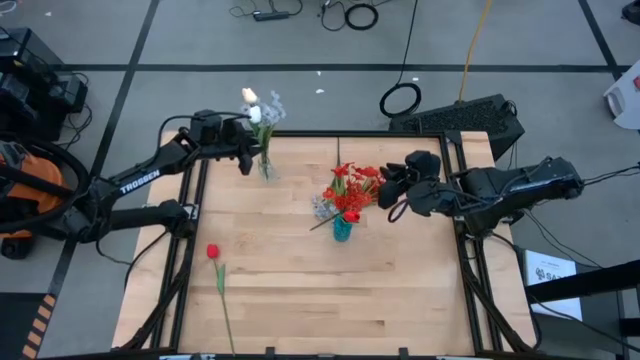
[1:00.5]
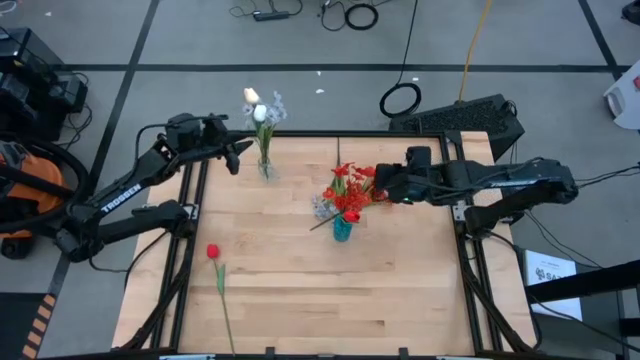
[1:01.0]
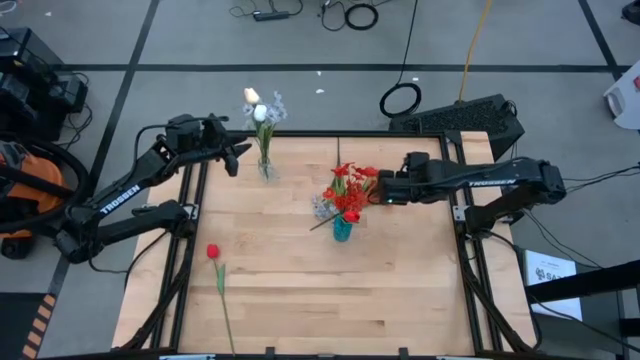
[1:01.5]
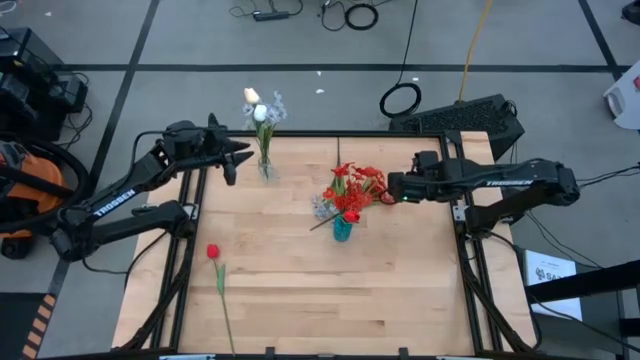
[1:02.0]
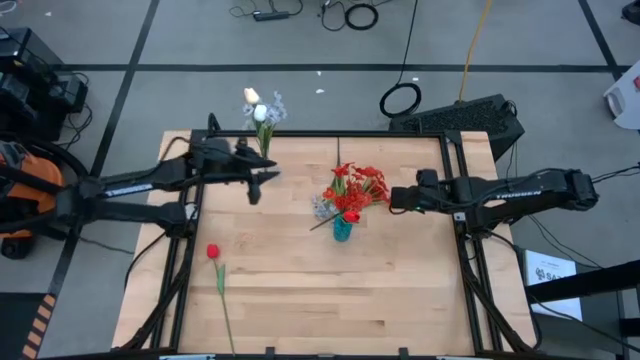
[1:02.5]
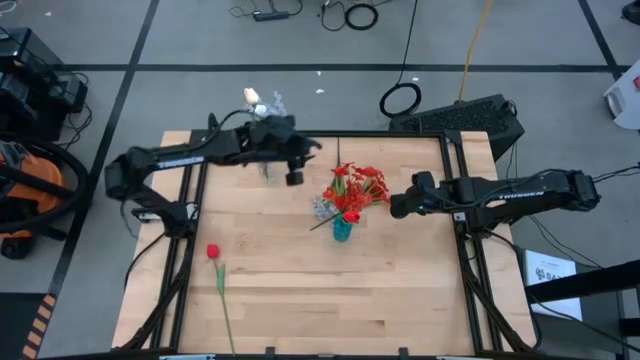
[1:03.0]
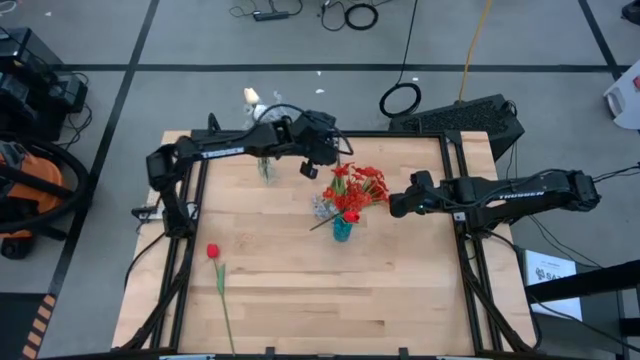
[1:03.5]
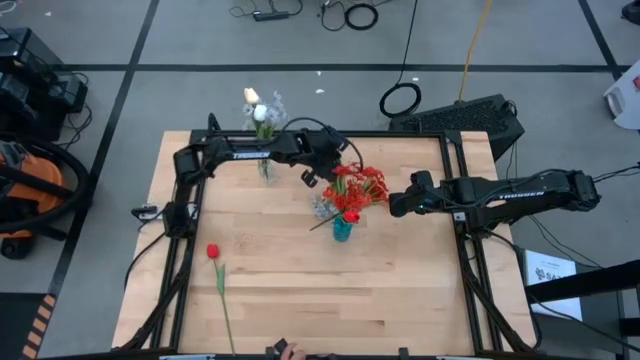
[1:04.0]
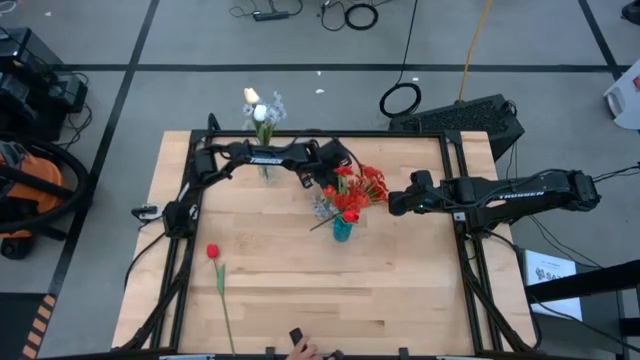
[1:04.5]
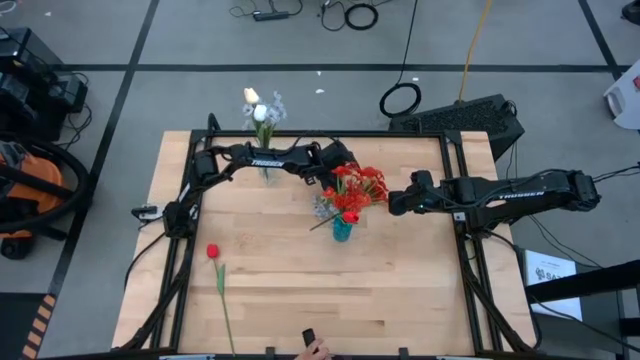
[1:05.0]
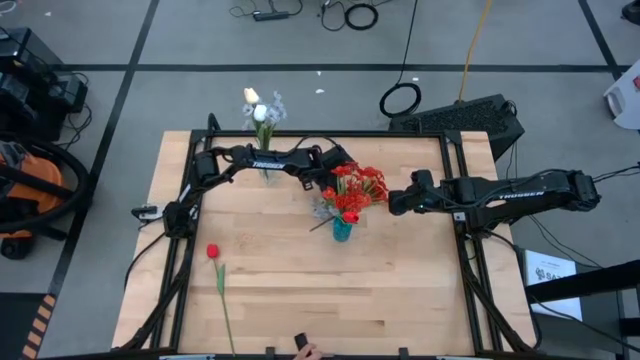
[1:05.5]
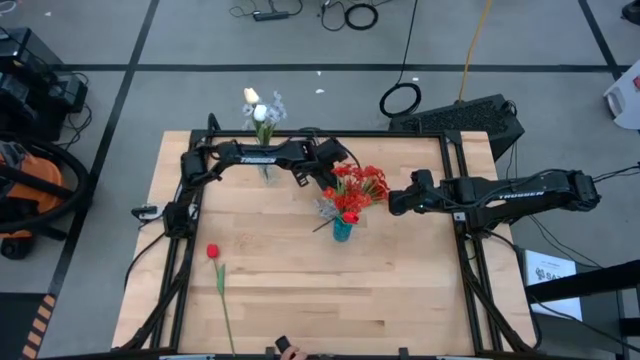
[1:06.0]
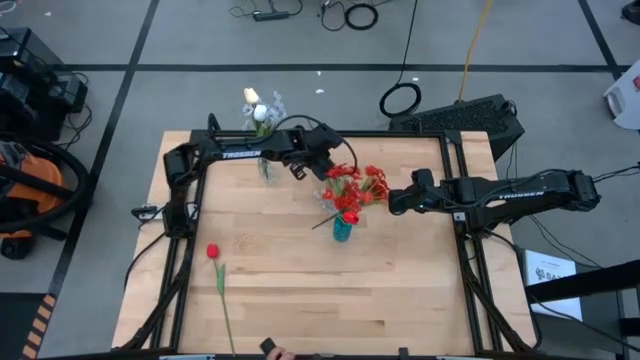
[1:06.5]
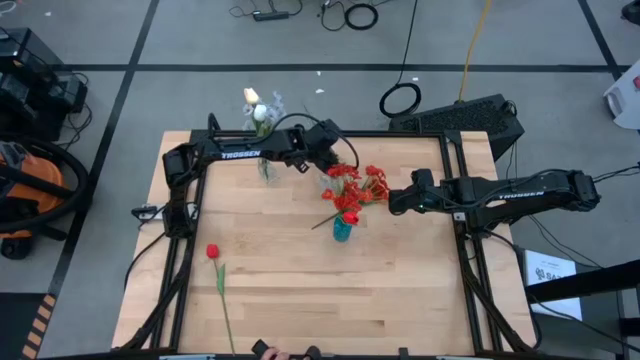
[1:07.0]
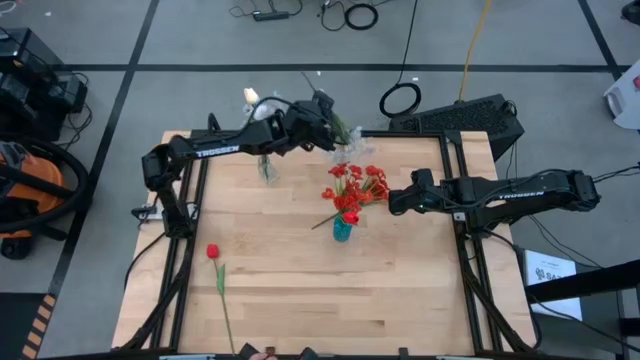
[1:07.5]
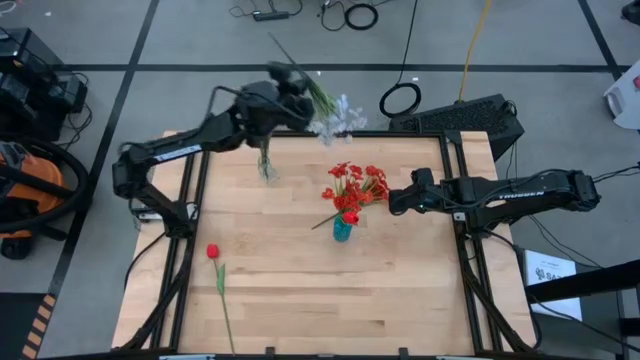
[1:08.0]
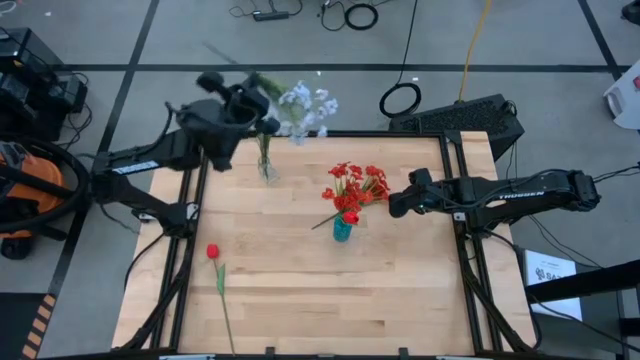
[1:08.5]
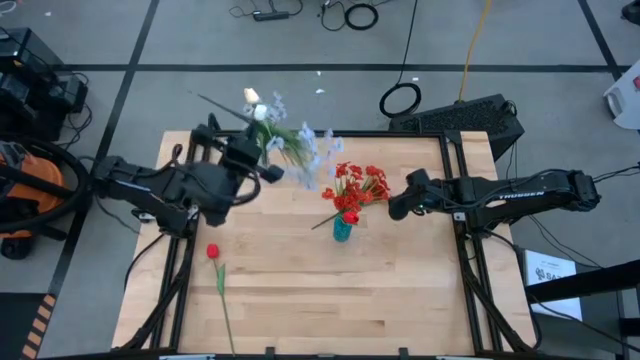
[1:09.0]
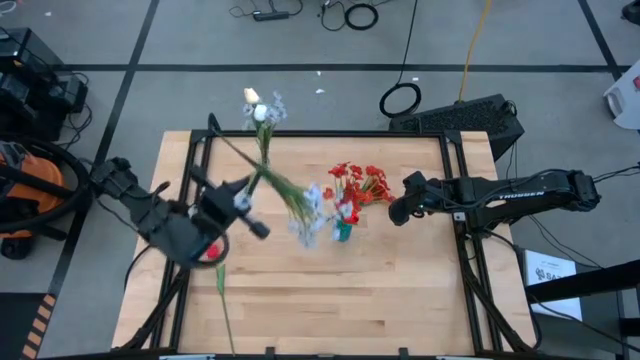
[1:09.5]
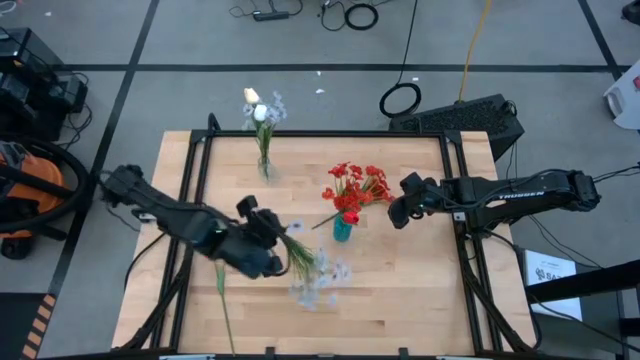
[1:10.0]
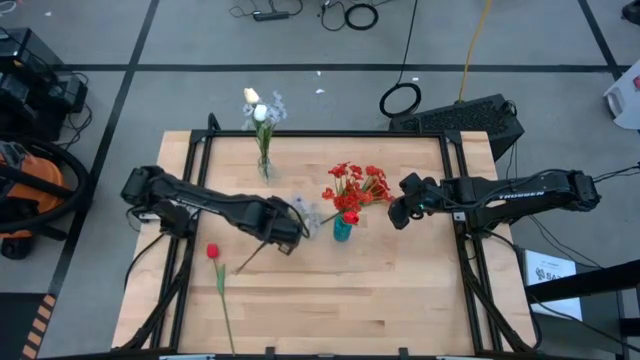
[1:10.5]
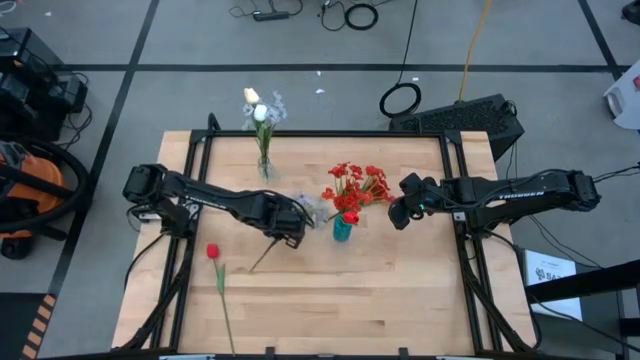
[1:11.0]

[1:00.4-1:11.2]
Task: Sort flowers into vase by color
Move the white poppies to the center of the table

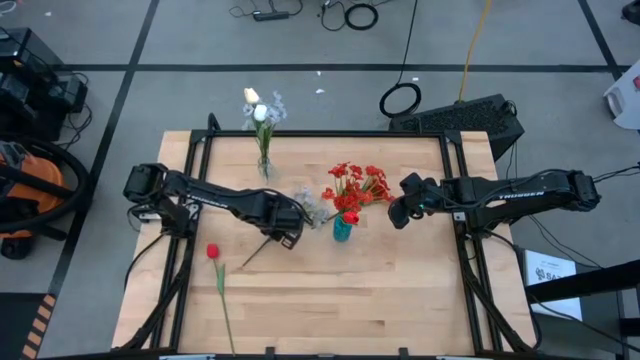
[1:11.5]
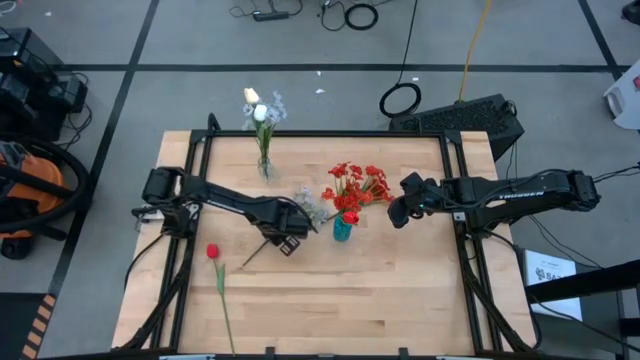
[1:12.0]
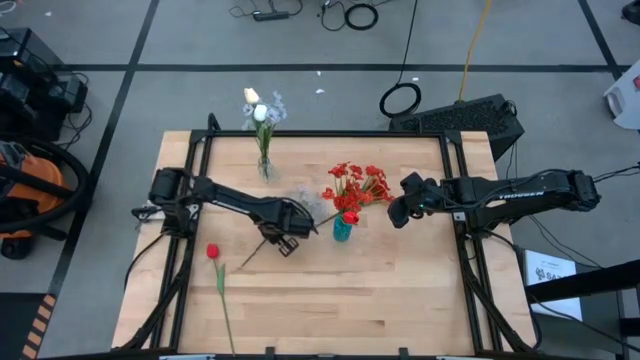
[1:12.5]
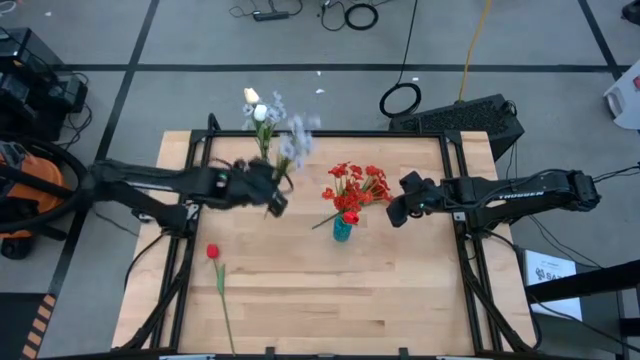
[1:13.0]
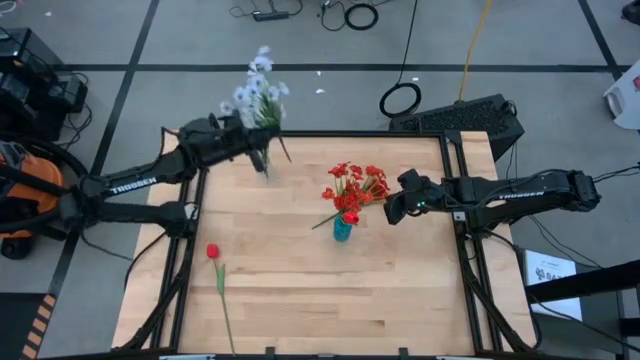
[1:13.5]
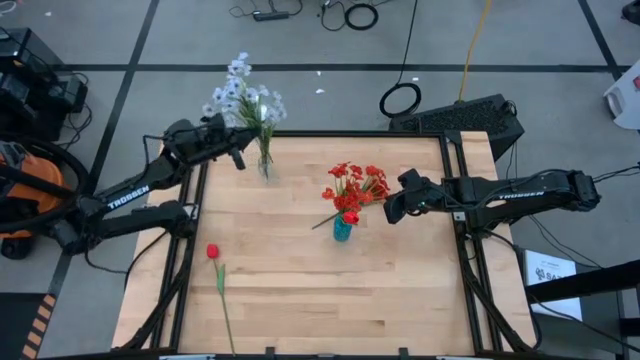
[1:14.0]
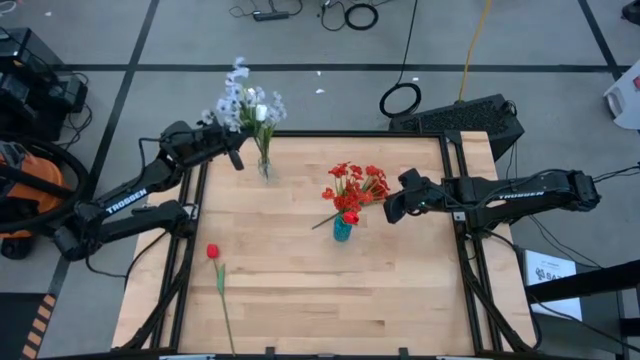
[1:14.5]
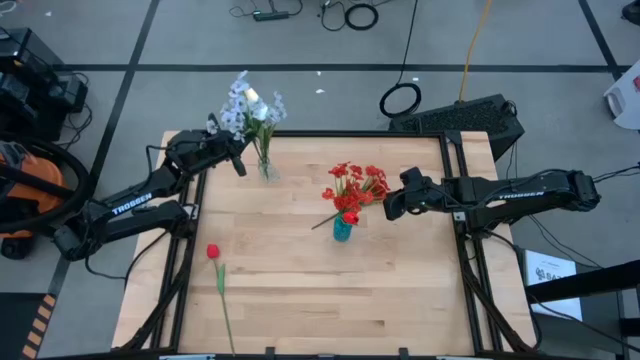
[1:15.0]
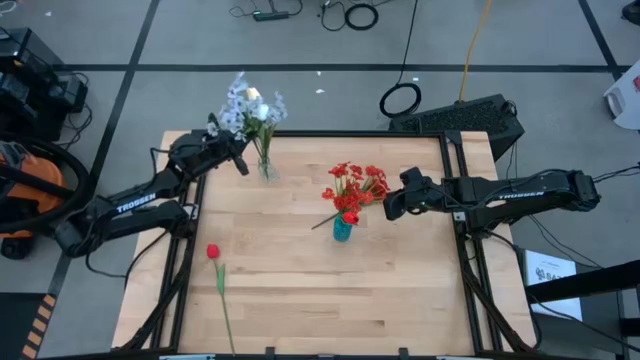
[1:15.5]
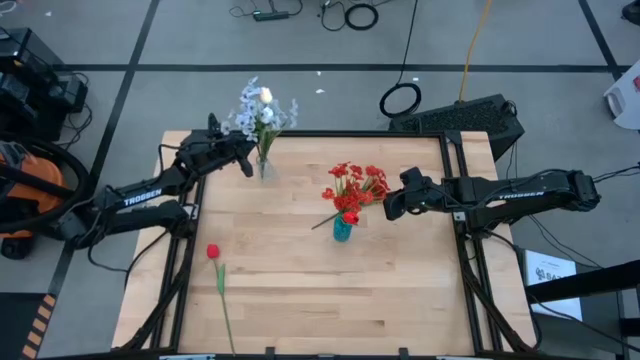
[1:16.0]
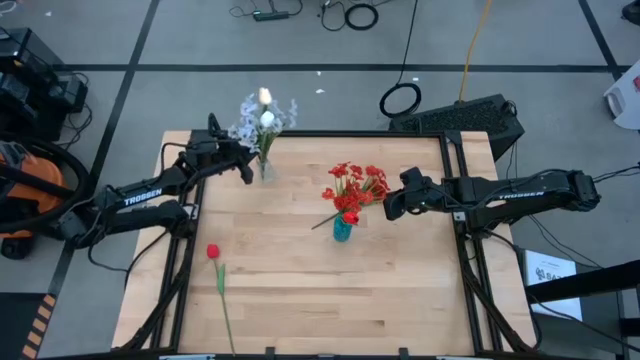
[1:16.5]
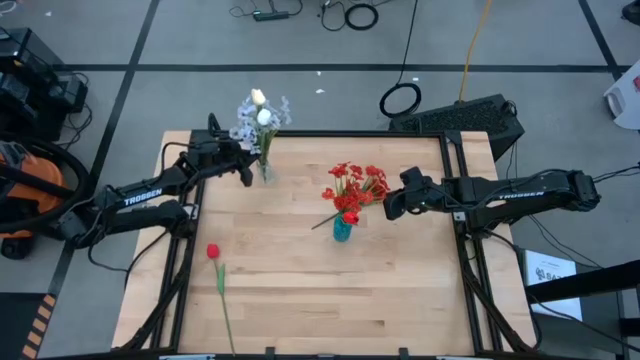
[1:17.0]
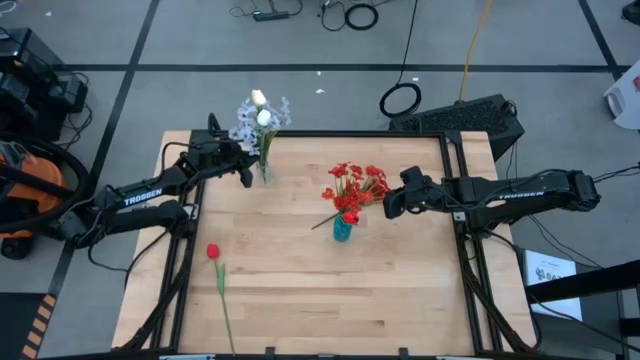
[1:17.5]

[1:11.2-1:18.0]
Put the white poppies into the transparent vase

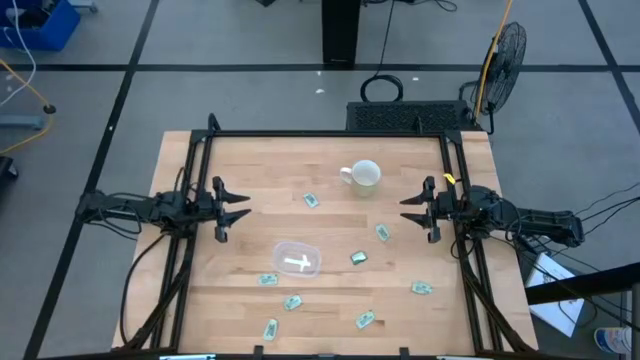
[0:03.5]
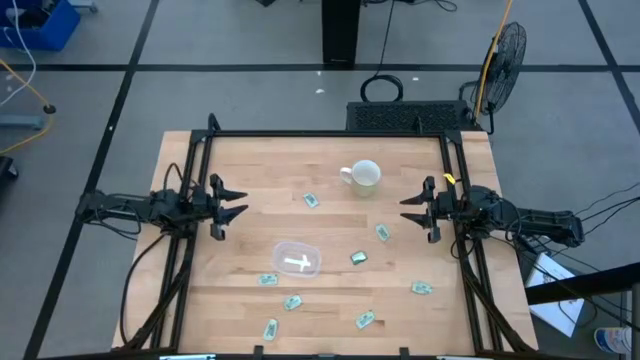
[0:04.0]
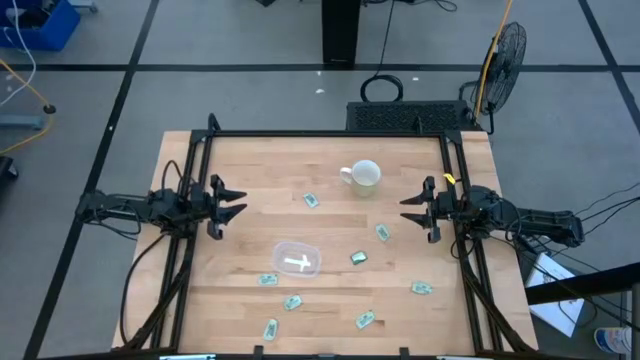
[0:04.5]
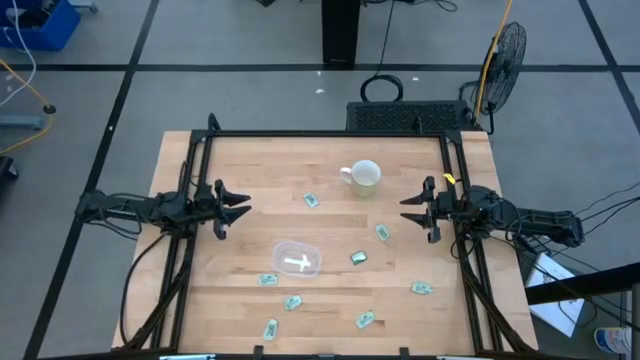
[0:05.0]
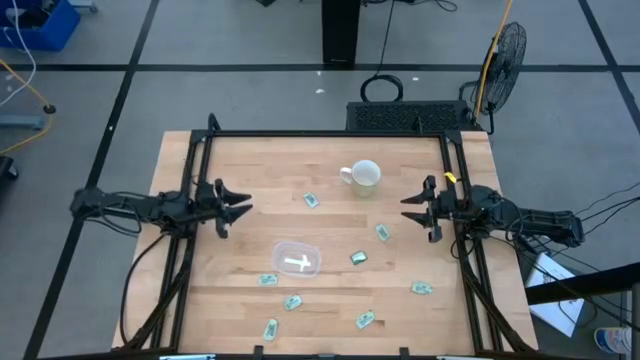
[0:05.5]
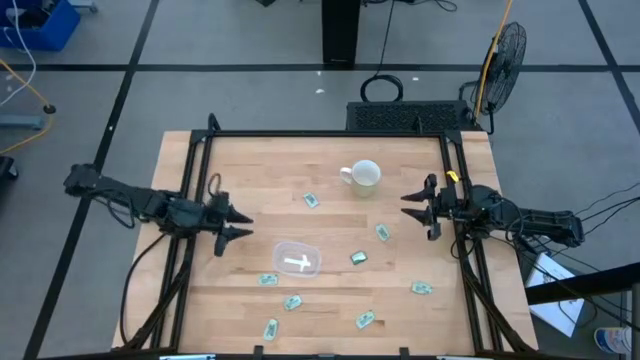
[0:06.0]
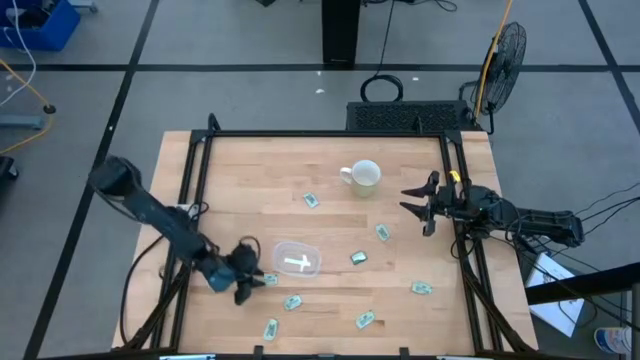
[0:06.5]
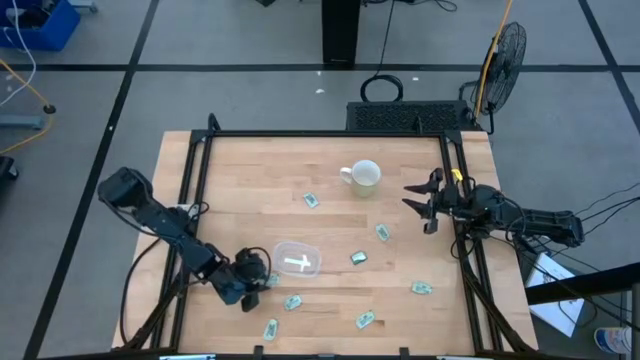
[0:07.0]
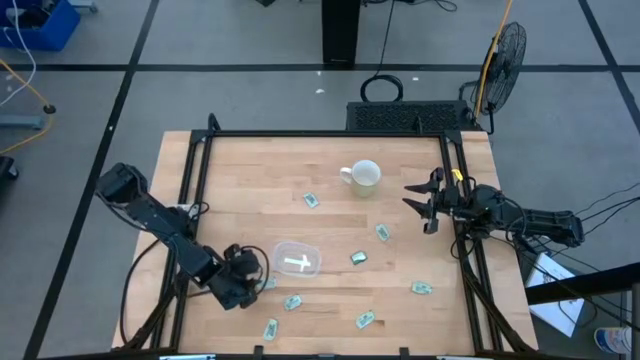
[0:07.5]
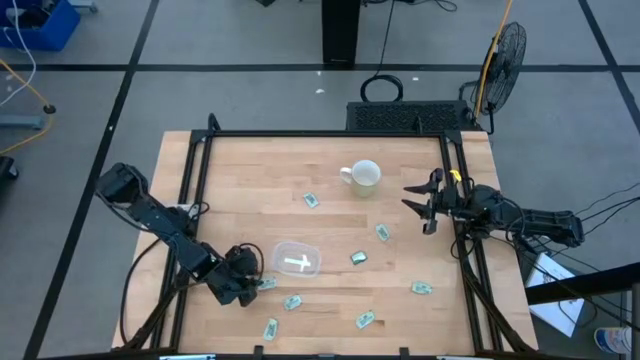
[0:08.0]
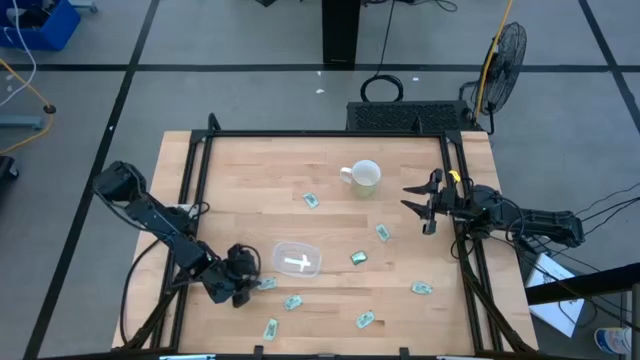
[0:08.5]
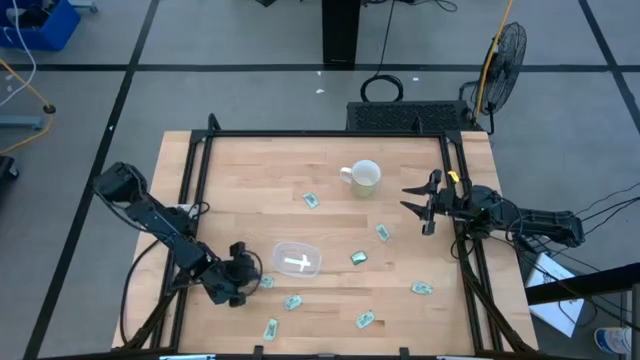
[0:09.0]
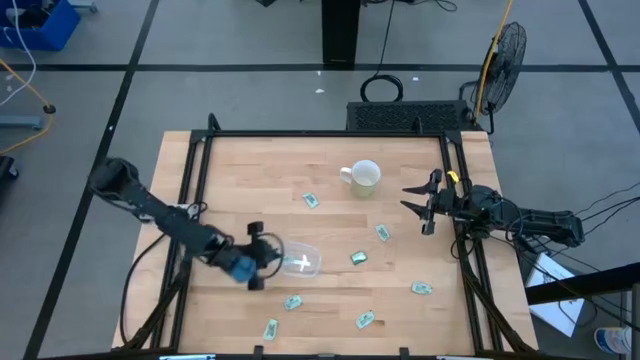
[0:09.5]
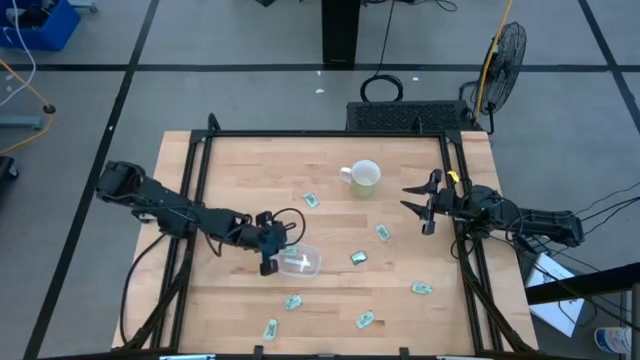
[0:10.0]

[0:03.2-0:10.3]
Task: Pick and place Stevia / Truvia into bins
Put the light green stevia packet into the transparent bin
